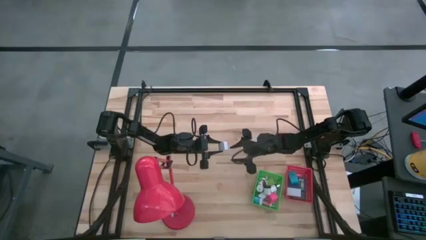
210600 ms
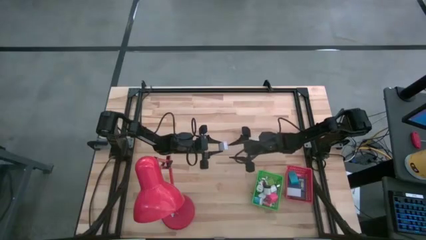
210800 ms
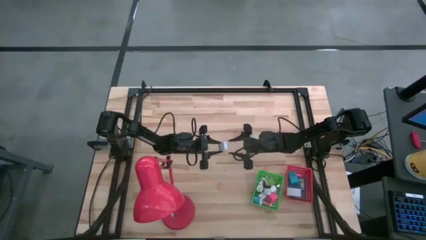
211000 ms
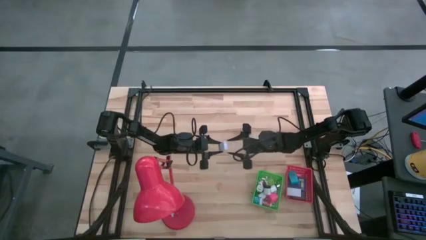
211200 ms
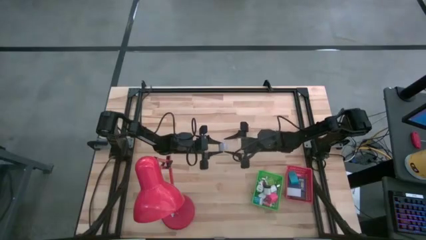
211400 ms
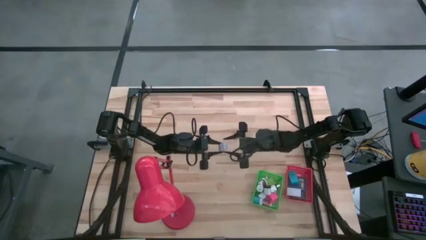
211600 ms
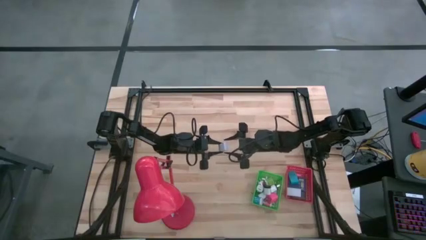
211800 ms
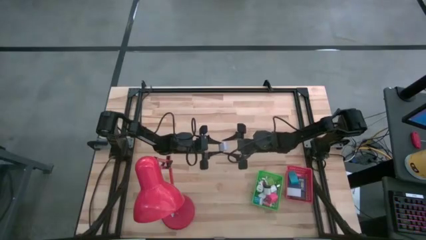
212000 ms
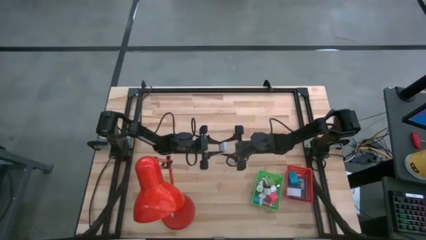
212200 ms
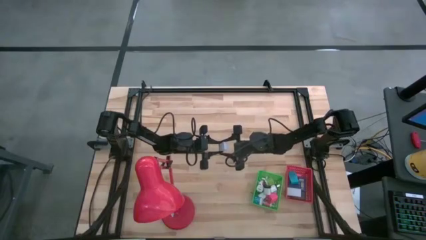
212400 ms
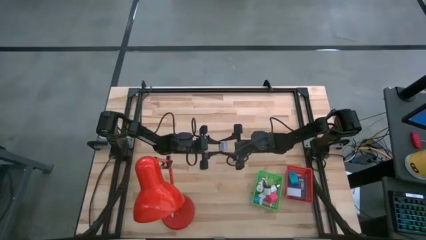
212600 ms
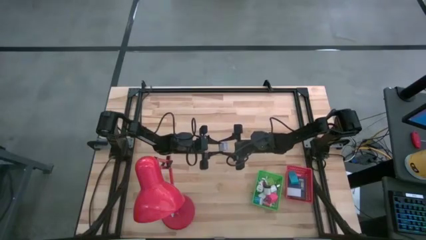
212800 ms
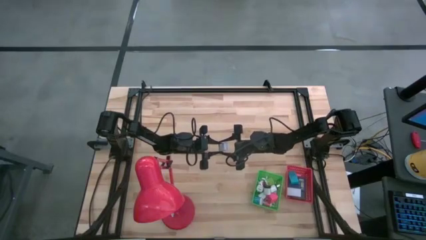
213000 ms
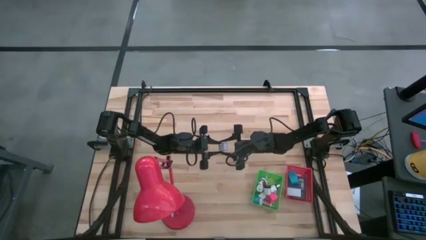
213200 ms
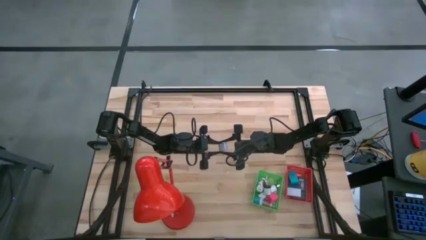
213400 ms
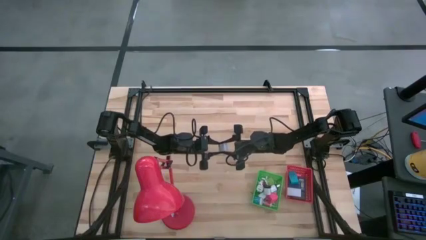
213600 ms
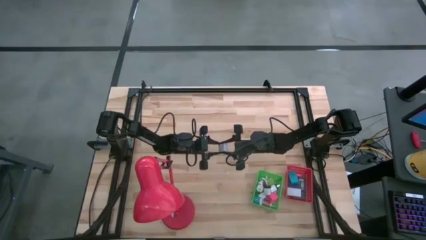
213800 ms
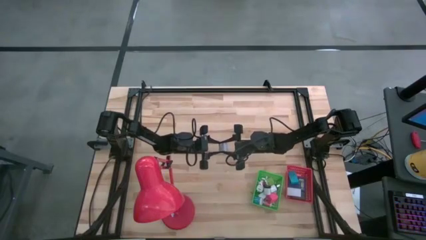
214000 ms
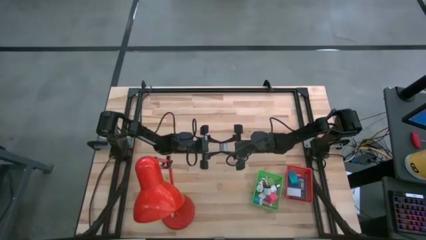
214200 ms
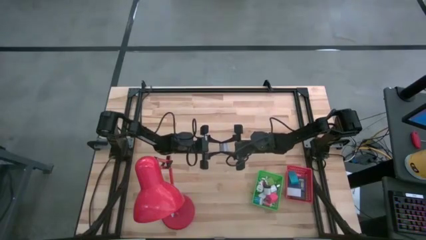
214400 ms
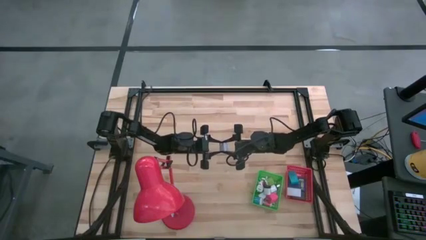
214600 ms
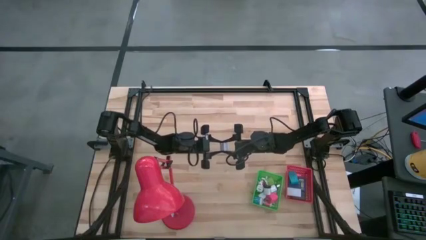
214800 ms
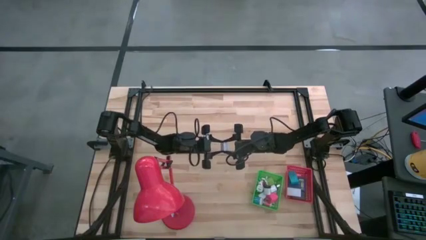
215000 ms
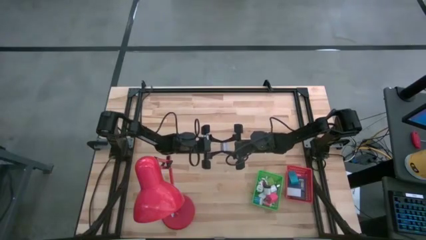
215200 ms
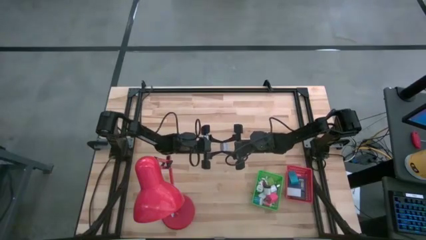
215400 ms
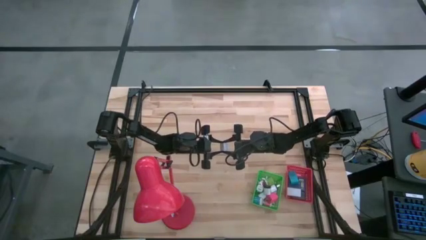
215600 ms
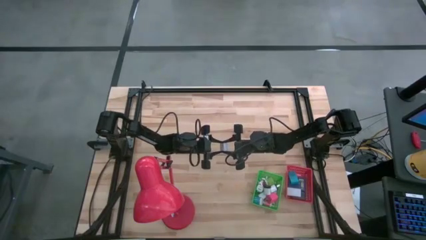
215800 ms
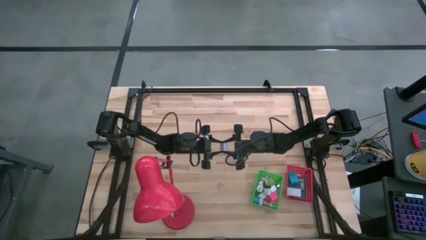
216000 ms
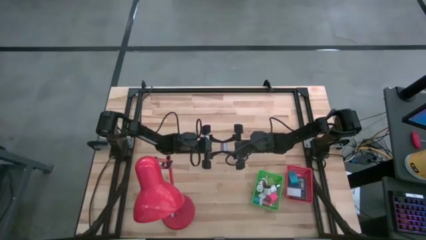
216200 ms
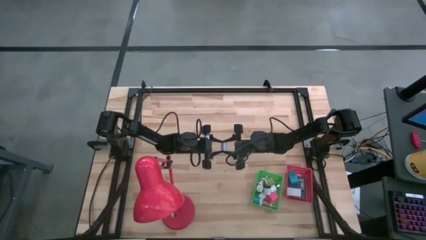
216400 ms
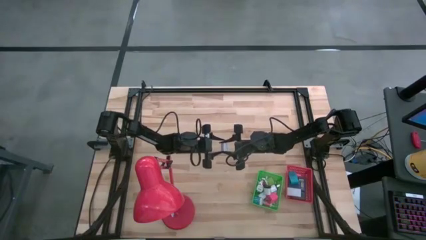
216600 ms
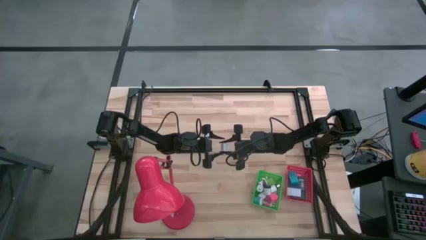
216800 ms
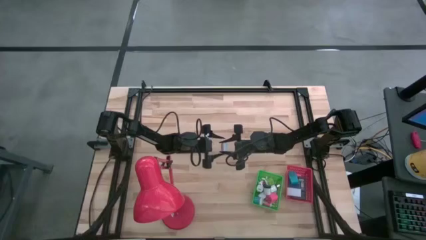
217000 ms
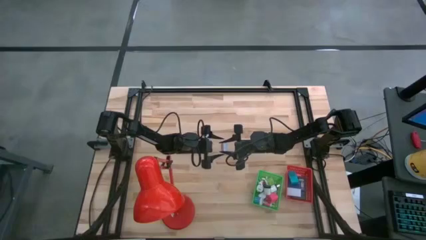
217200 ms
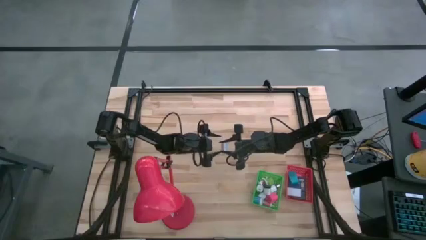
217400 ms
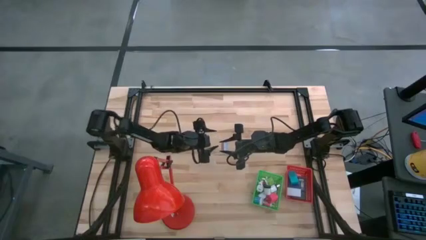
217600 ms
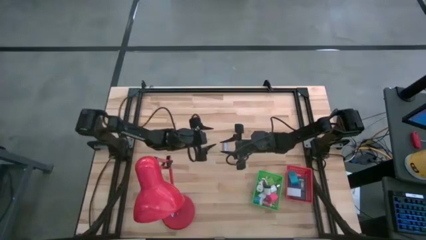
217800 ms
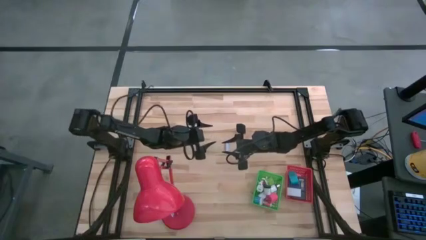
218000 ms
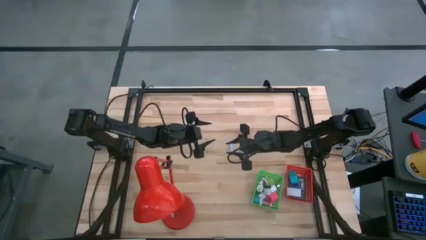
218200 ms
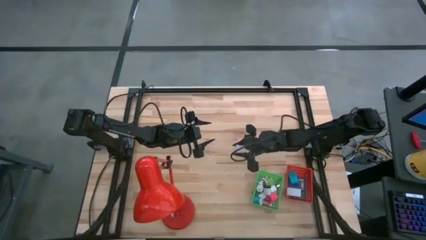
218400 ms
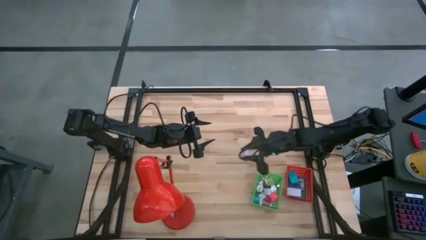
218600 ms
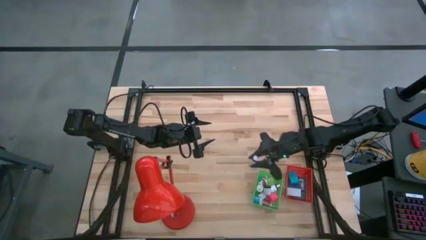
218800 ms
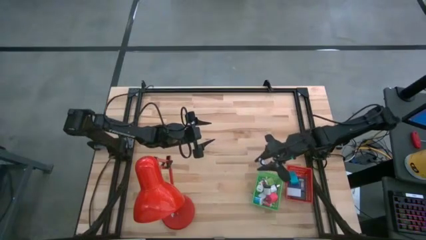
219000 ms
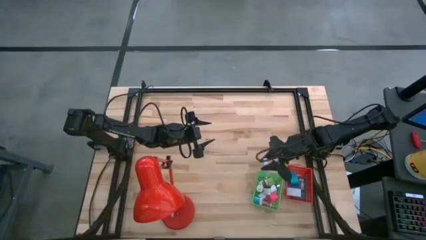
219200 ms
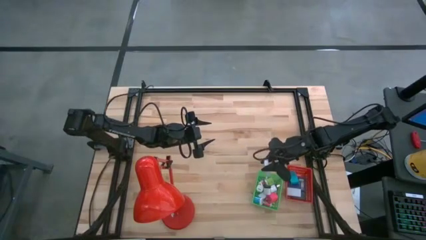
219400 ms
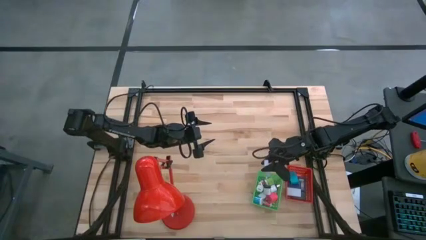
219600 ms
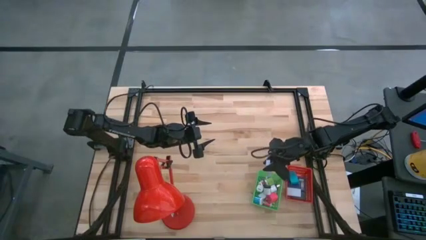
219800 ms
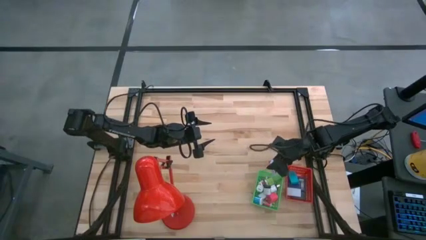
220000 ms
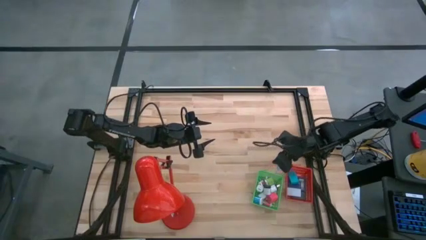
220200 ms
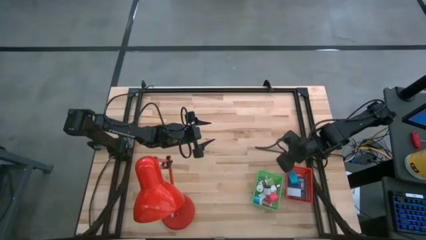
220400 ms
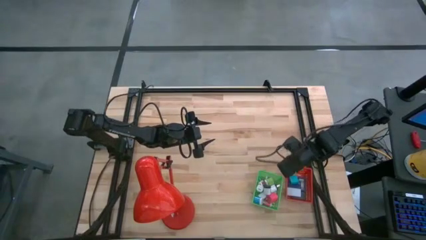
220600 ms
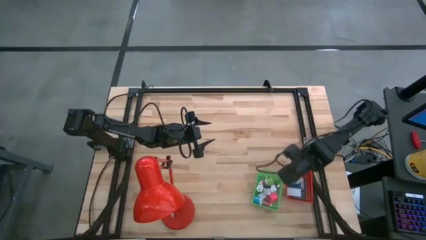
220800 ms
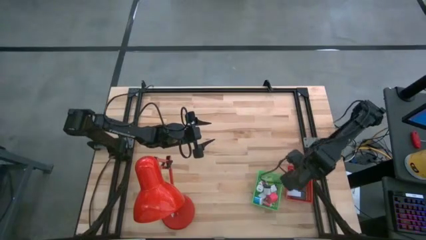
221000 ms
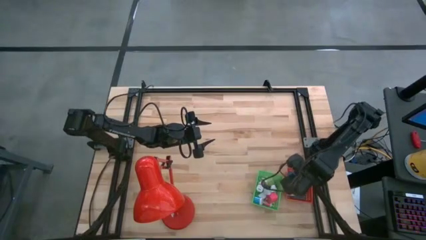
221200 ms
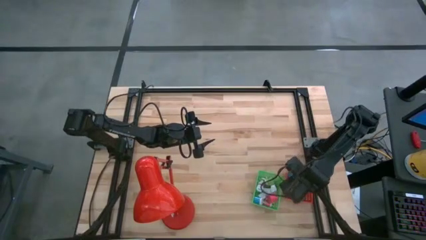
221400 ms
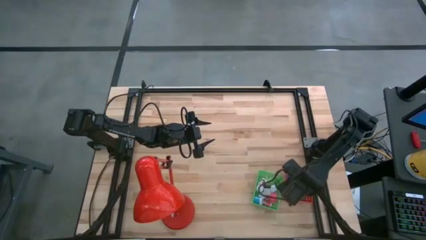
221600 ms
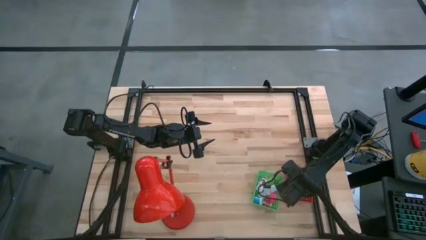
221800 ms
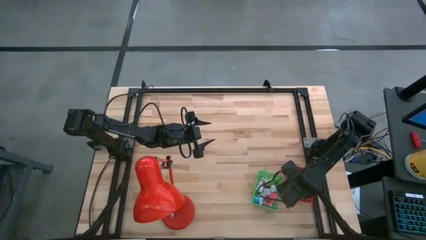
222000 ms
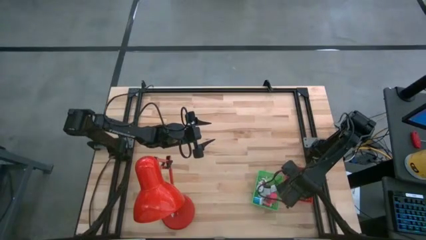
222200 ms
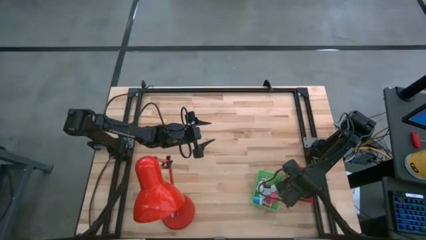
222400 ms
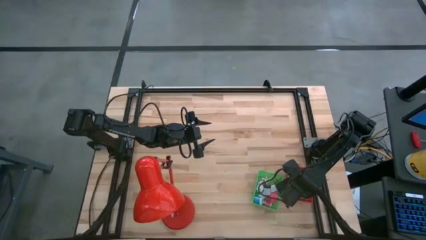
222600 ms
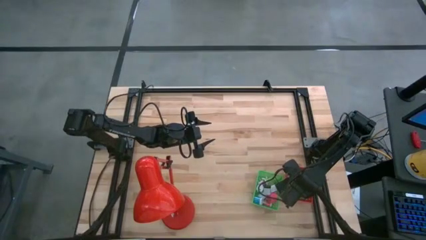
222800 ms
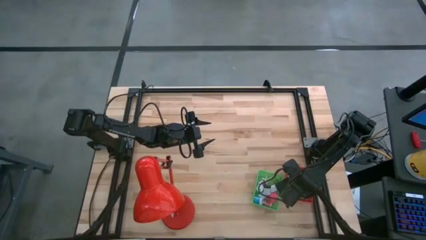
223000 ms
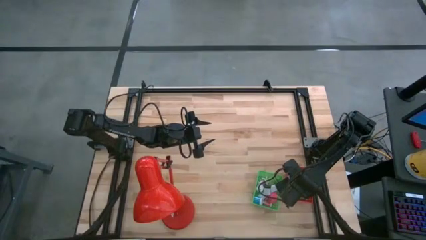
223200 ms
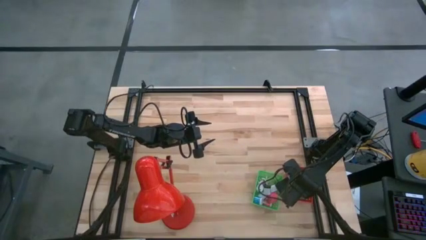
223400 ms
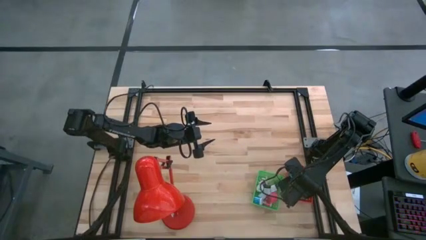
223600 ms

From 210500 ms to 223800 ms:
Task: Pick & Place Office items
Put the white digital clock into the red basket

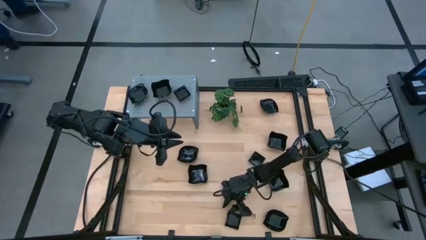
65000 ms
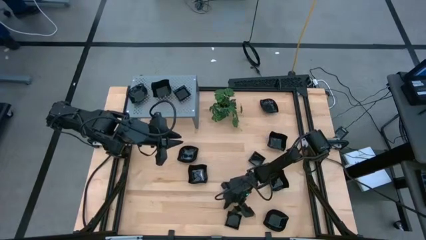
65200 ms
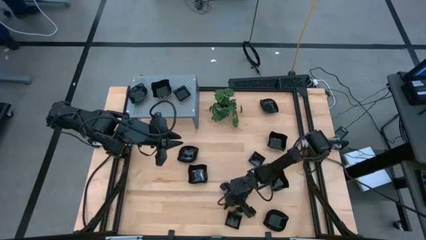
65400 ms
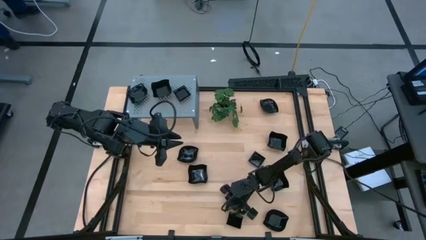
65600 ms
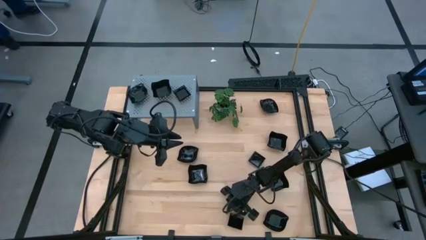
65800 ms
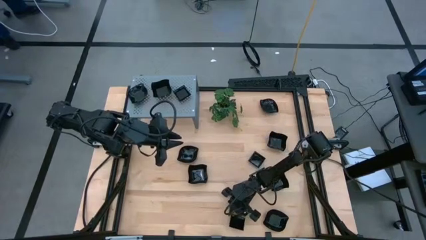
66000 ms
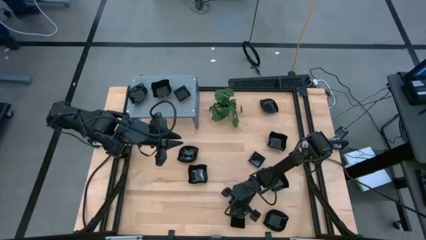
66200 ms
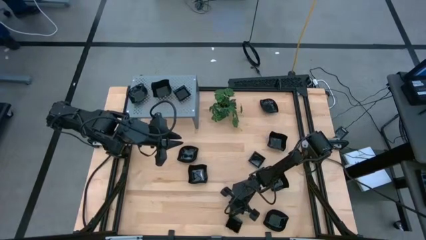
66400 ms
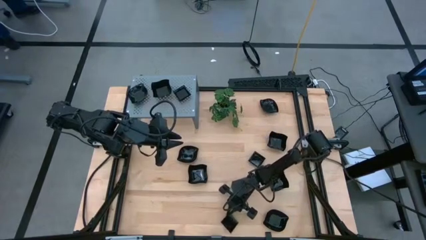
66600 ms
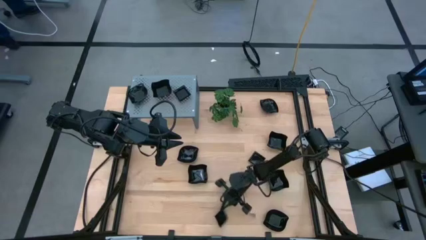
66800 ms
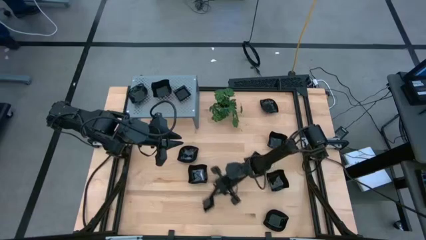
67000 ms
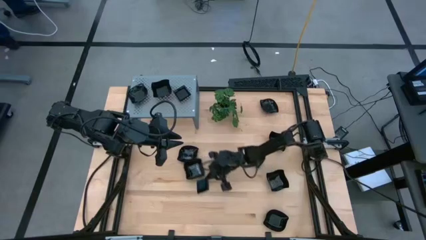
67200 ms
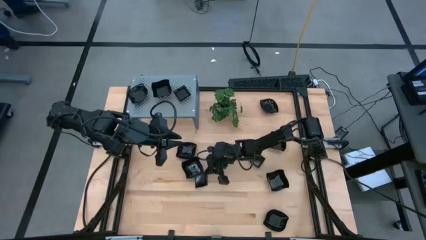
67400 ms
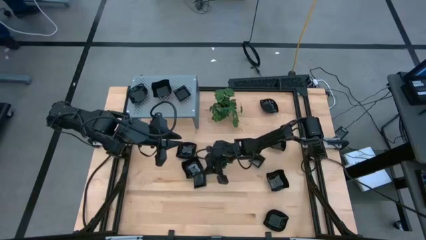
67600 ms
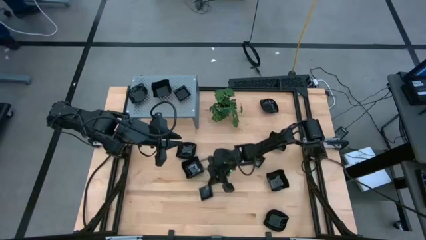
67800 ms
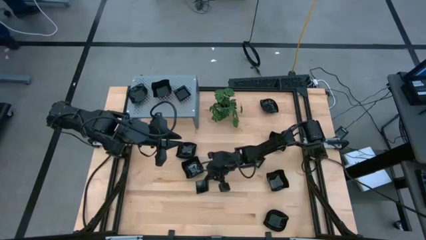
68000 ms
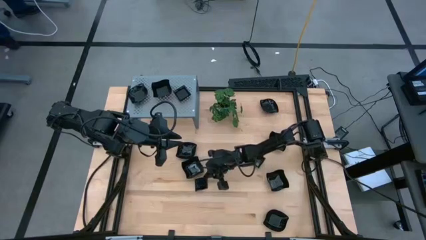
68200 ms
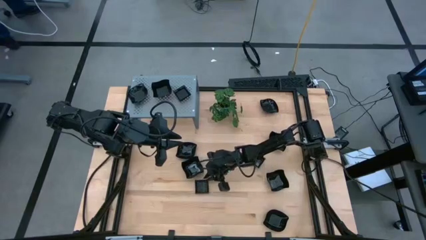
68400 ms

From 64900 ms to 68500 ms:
Task: Pick & Place Mini shaped plates
Move the black square plate to the center of the table

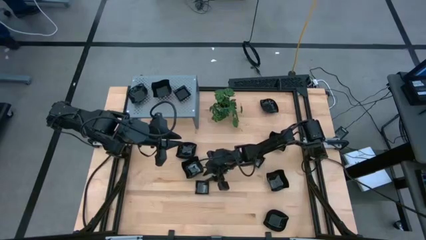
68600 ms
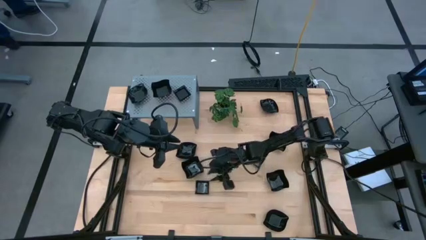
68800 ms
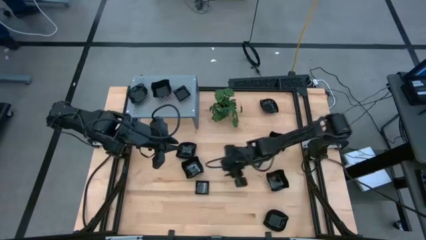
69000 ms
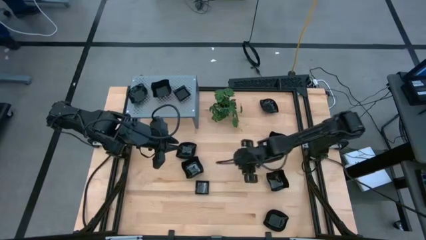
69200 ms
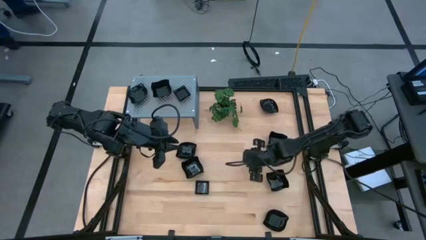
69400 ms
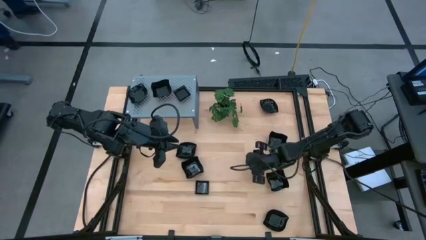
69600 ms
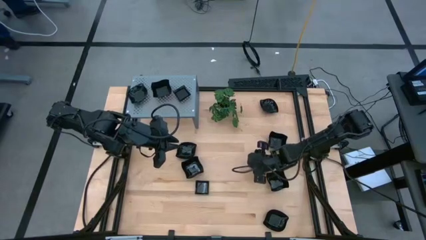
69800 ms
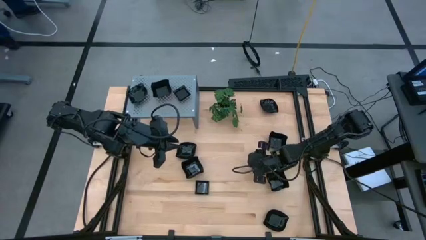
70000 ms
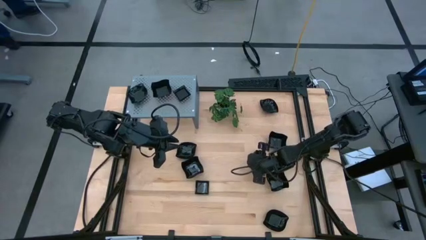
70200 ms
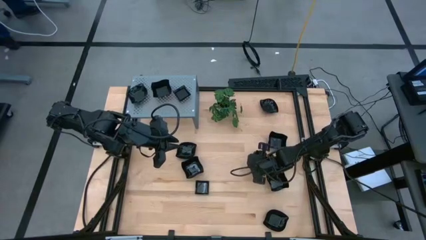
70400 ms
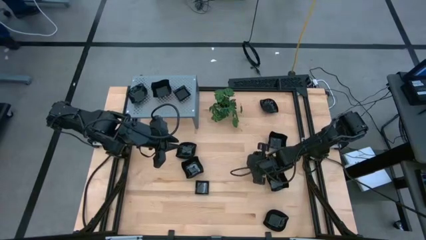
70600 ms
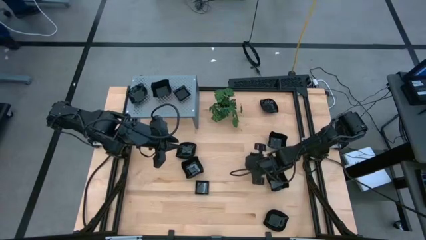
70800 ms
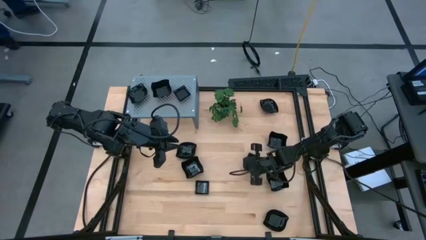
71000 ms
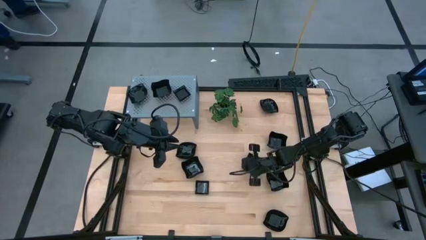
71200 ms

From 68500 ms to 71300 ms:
Move the black square plate to the center of the table
